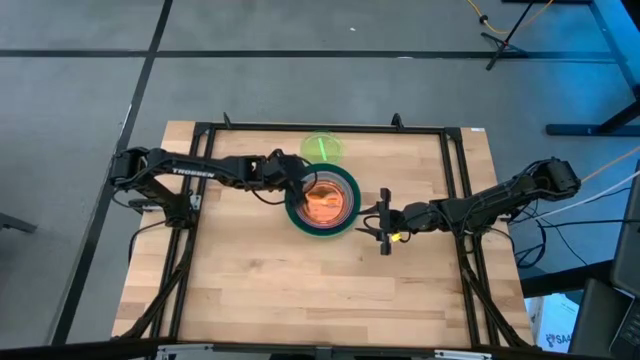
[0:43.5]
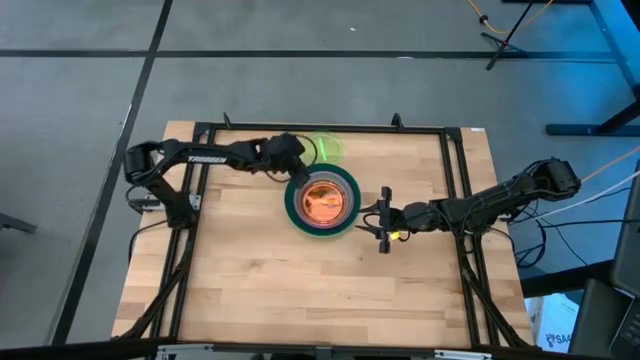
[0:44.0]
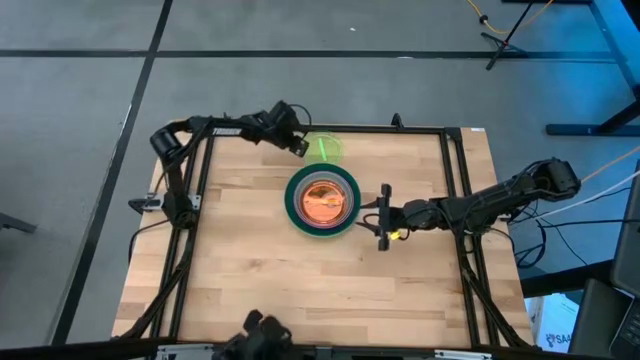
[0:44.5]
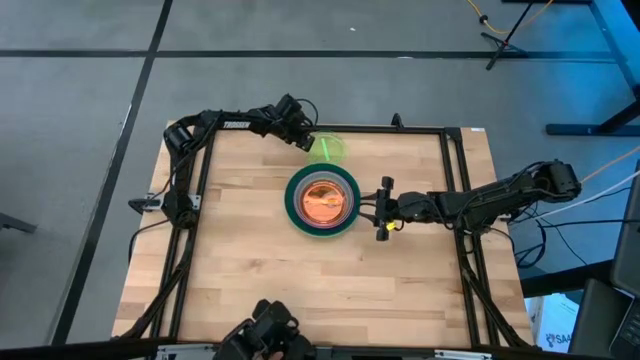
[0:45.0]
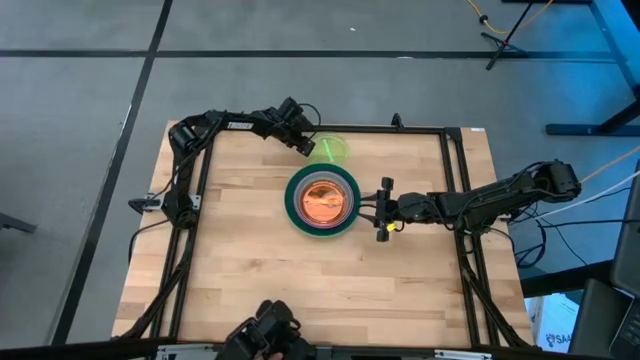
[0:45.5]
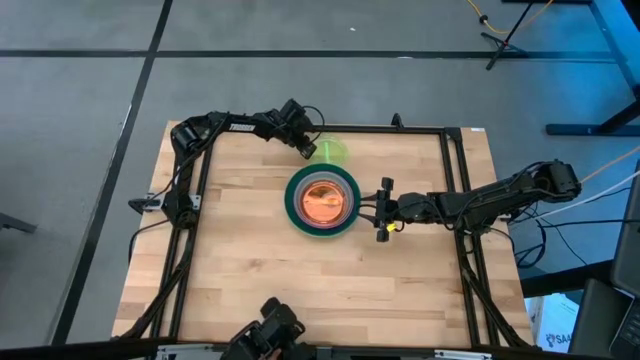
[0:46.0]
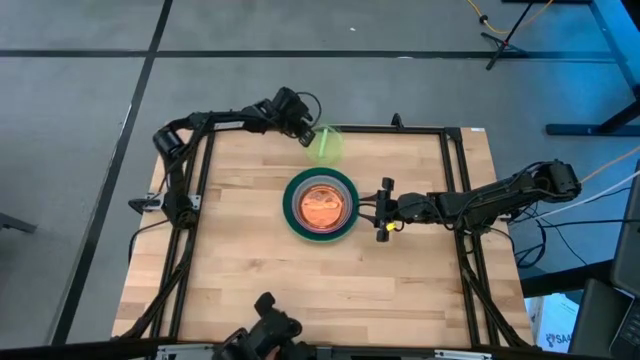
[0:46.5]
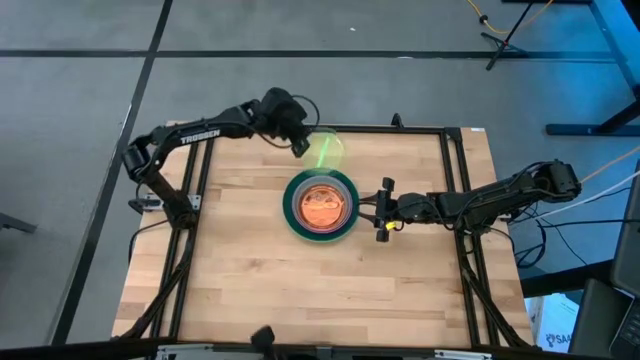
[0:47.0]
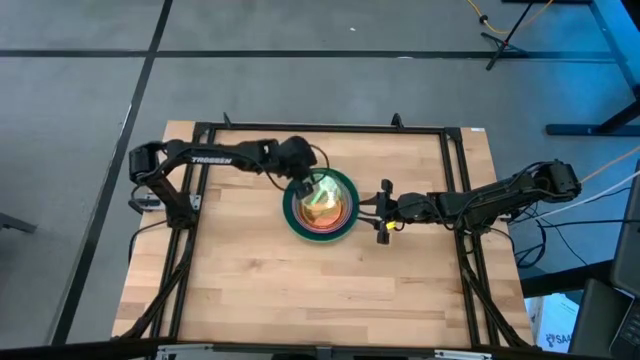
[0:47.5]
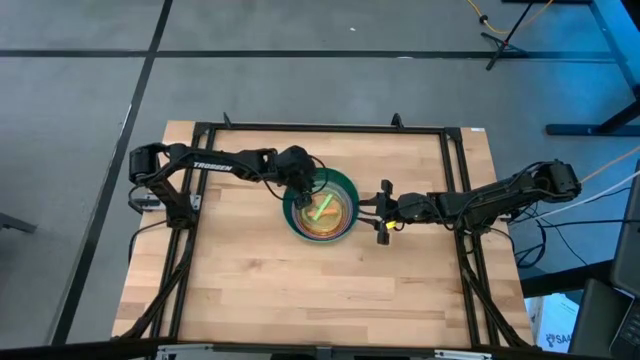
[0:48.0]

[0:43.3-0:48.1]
Task: Stack plastic plates
Stack the green plate on top of the orange plate

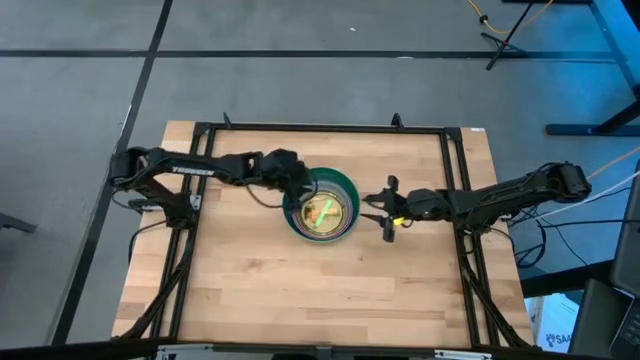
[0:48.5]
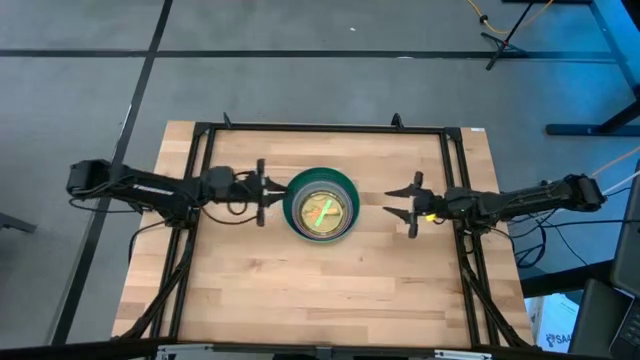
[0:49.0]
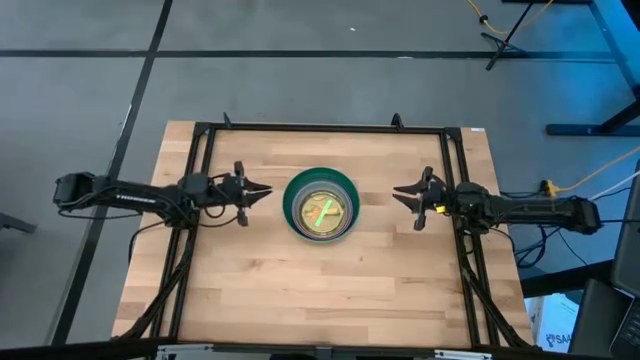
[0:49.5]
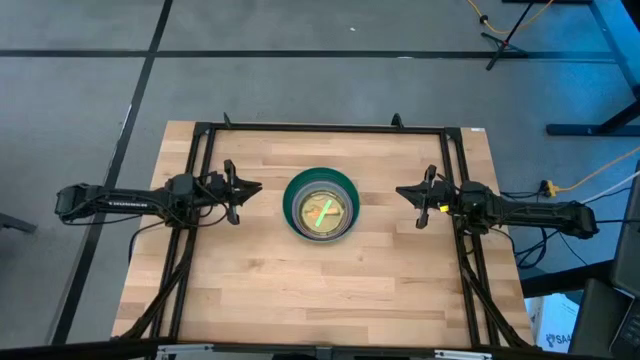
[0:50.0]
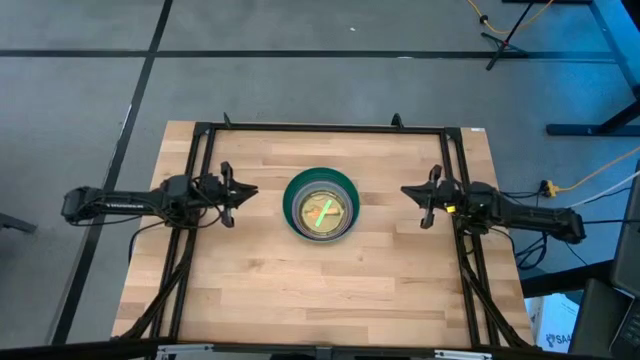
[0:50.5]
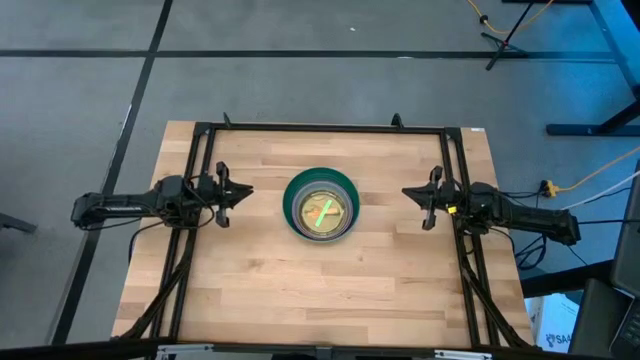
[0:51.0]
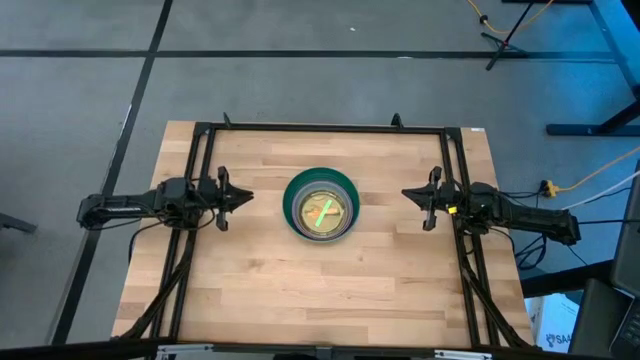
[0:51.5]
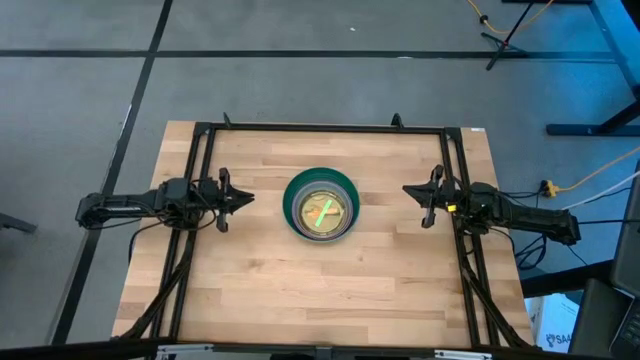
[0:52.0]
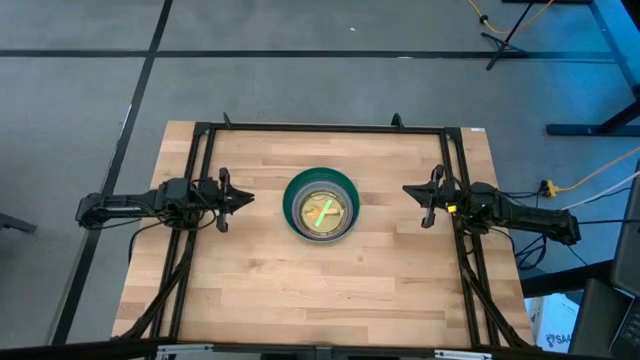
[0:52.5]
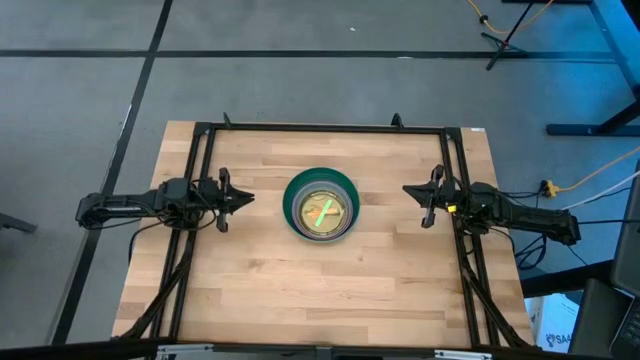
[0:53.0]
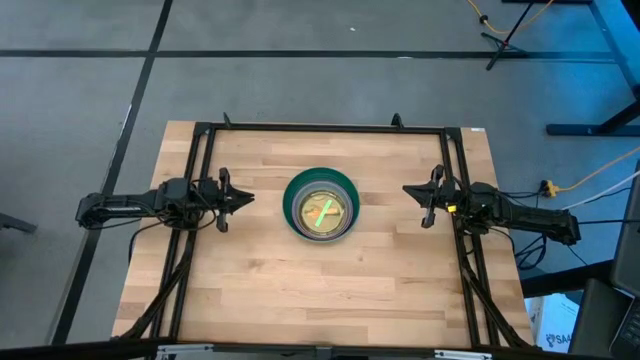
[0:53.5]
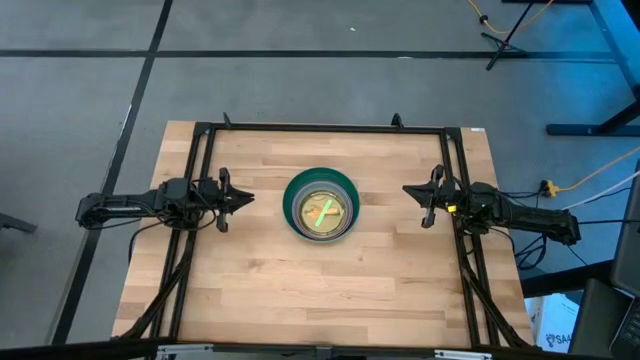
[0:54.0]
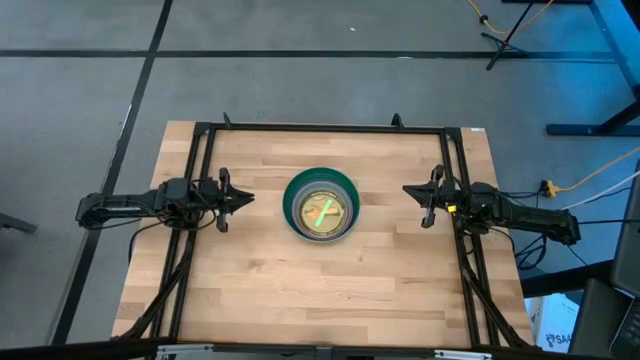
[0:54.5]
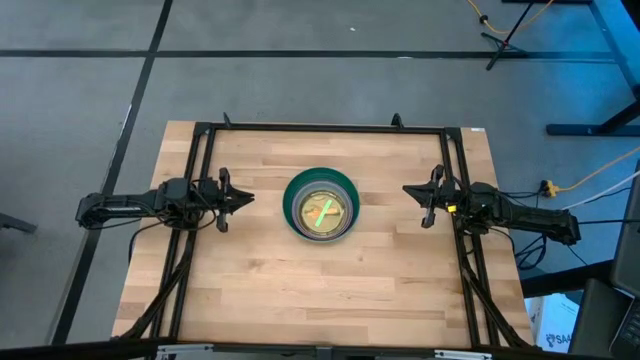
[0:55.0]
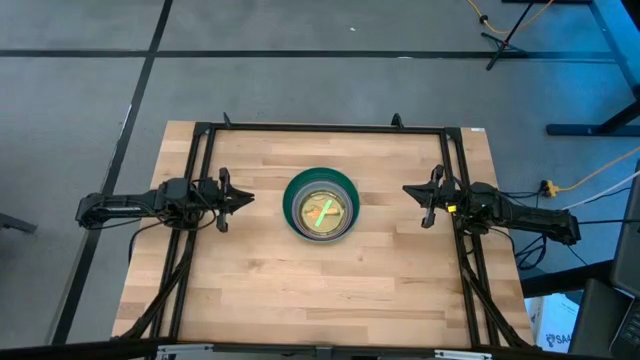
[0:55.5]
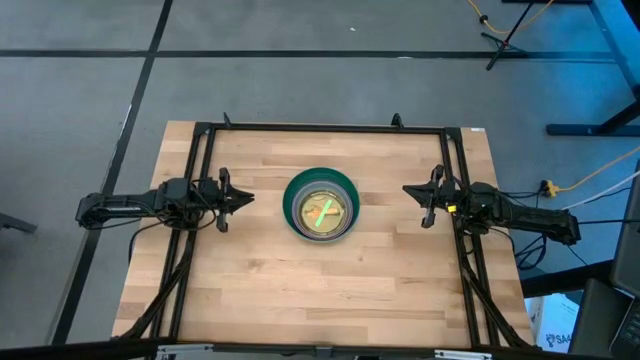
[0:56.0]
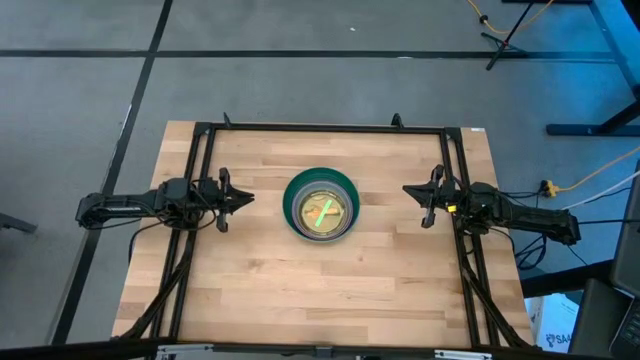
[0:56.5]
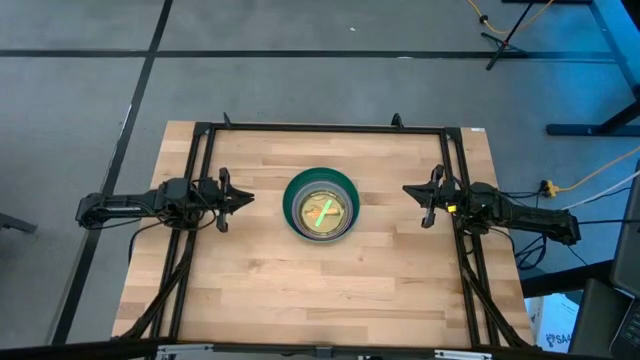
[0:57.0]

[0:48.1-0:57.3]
Return to Home Position

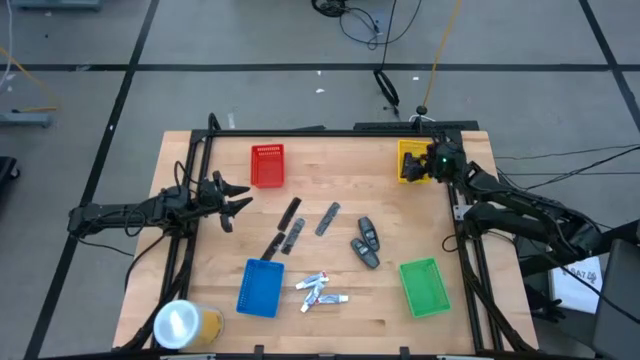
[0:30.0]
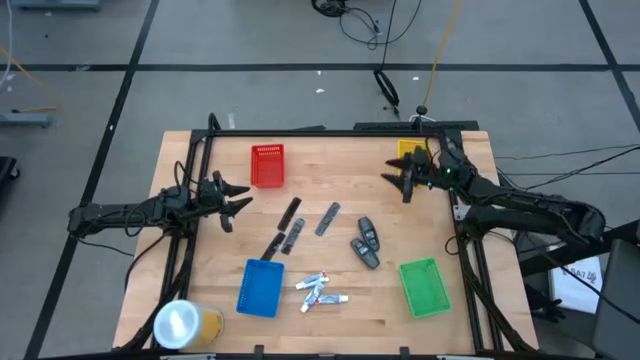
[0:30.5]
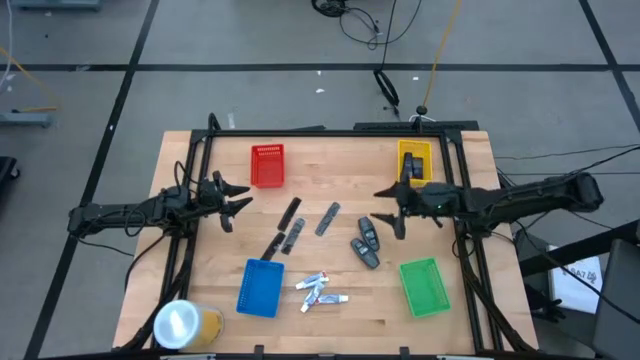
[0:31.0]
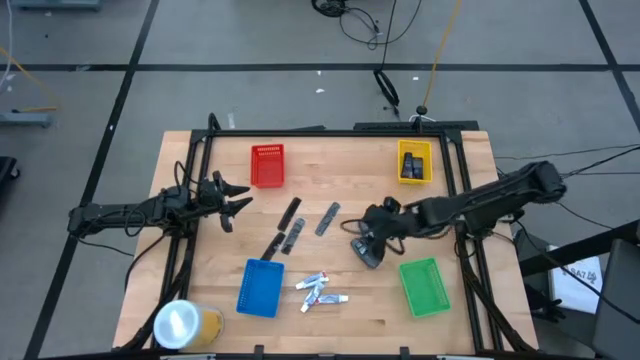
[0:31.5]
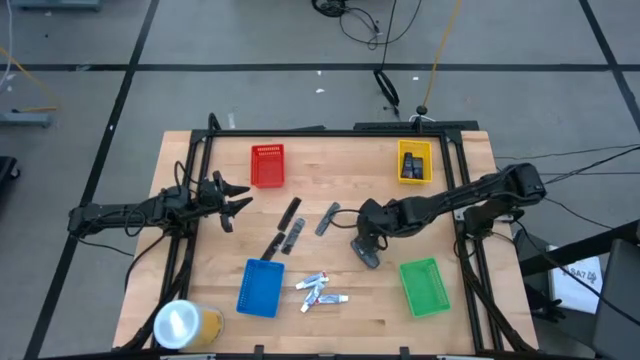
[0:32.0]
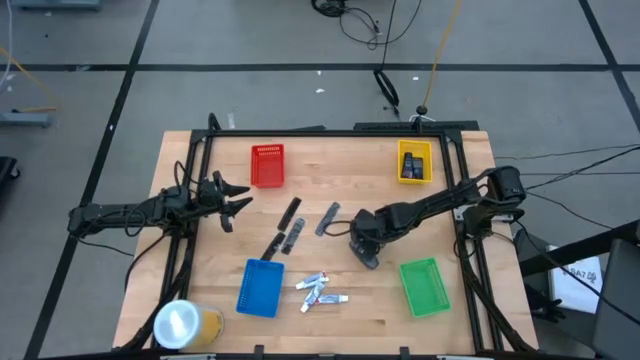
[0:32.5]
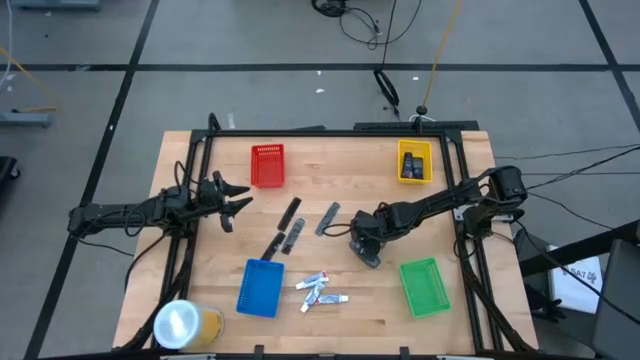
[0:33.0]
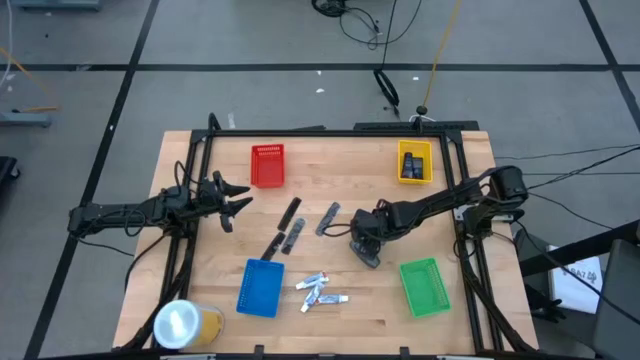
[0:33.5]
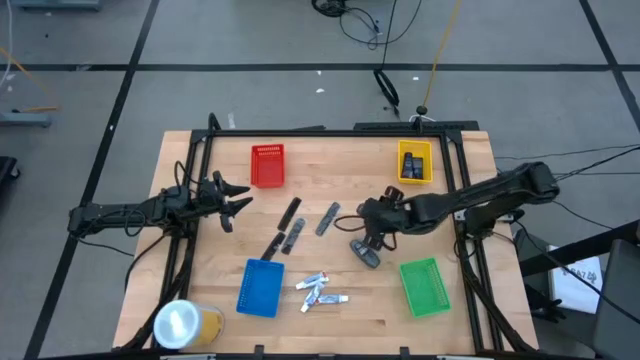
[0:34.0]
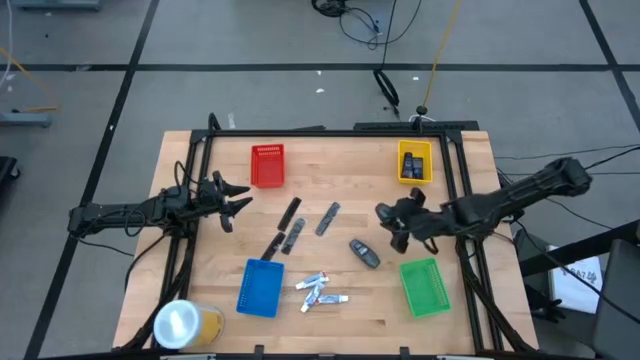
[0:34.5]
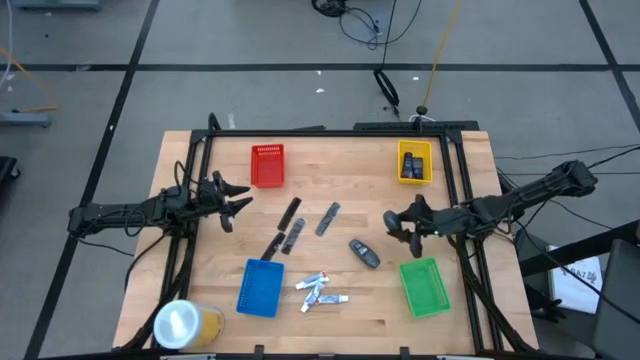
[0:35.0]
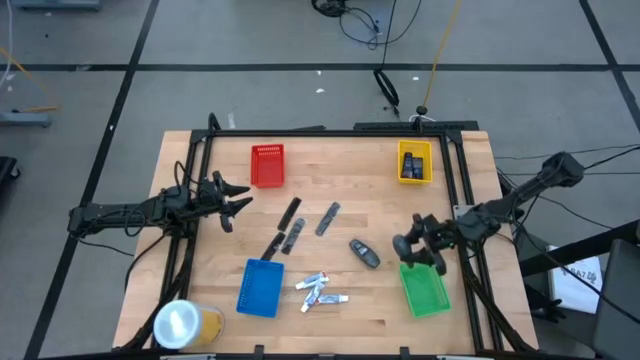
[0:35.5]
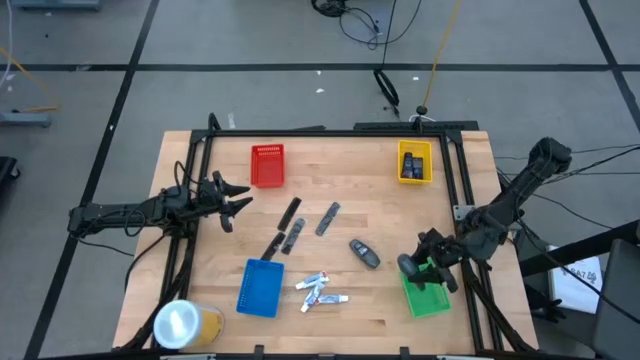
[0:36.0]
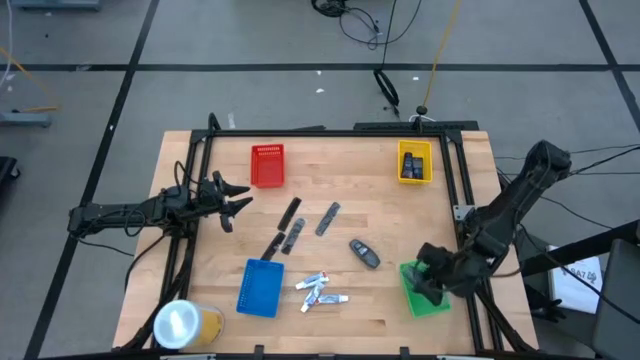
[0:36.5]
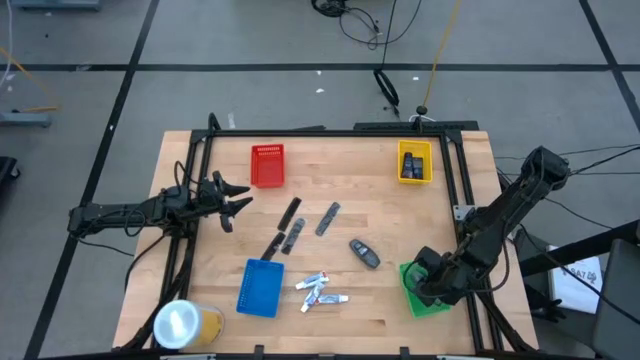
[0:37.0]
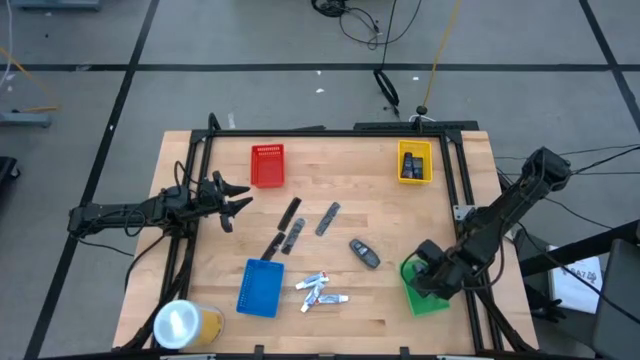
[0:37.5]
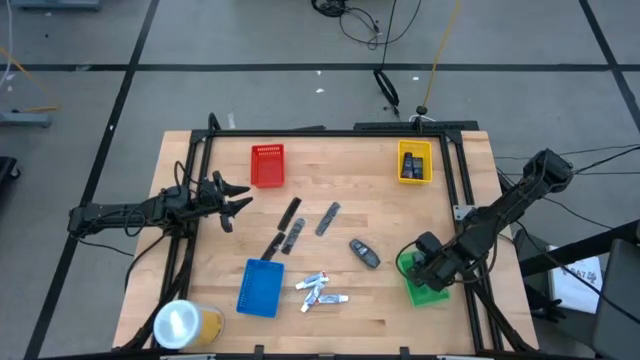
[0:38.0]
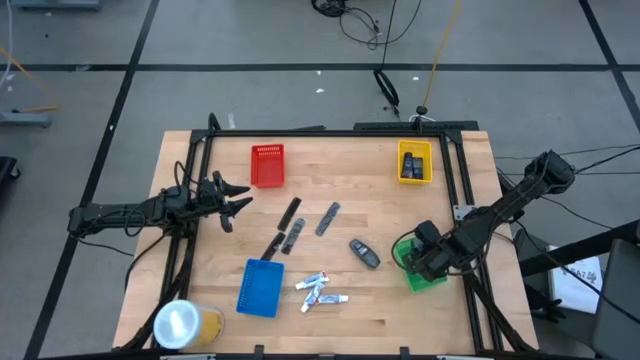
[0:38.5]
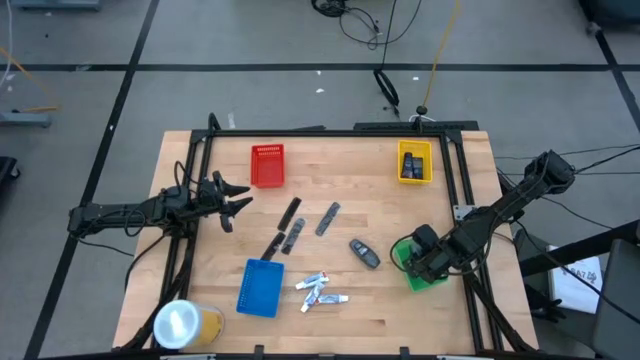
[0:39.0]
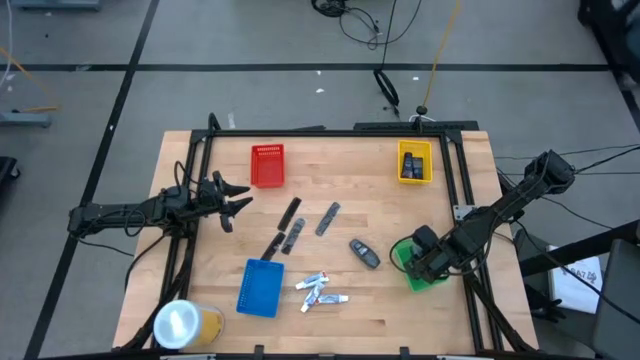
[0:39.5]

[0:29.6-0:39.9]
Task: Pick & Place Travel size toiletries
Put the top gray deodorant into the green basket
